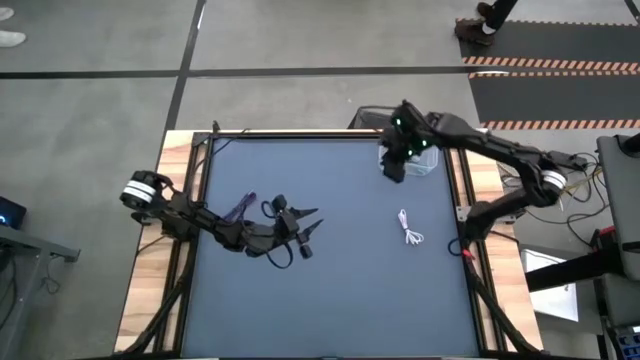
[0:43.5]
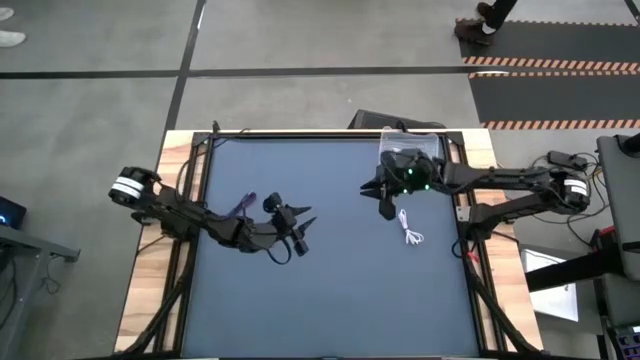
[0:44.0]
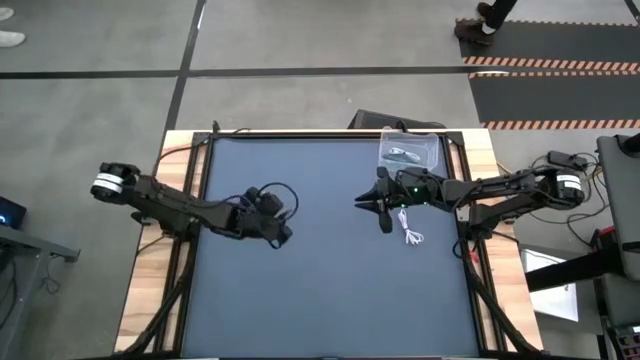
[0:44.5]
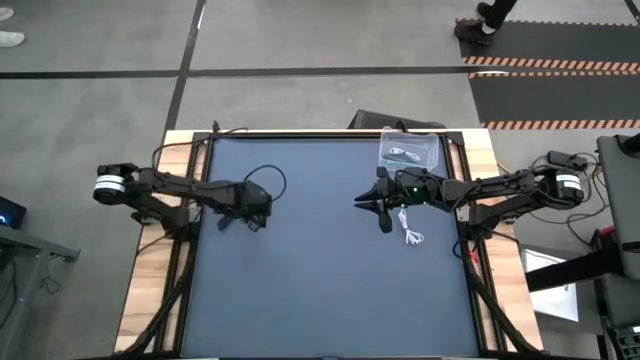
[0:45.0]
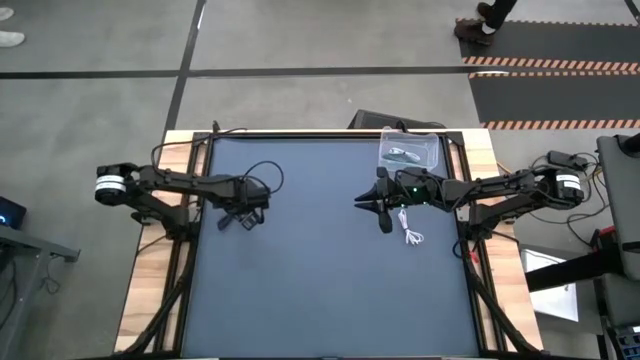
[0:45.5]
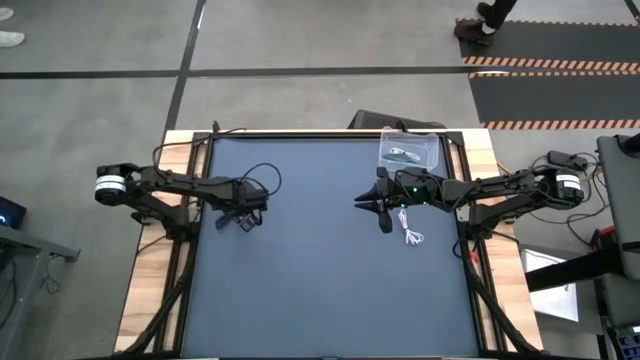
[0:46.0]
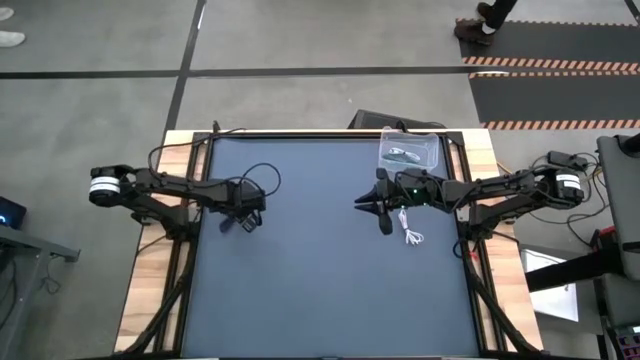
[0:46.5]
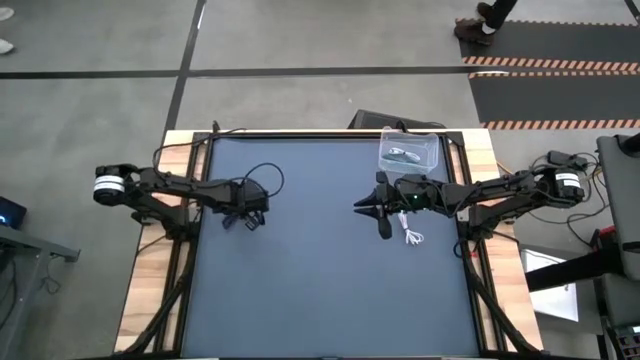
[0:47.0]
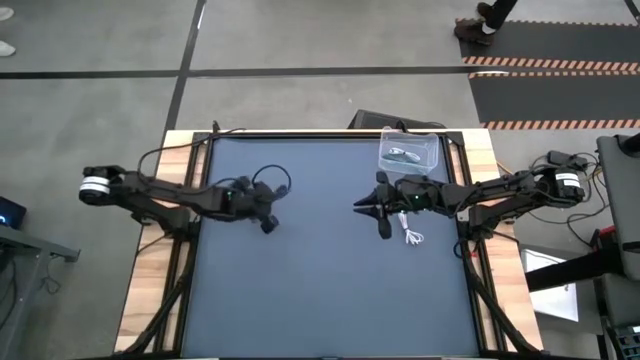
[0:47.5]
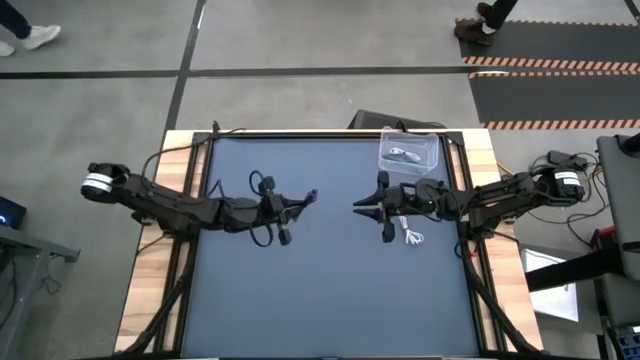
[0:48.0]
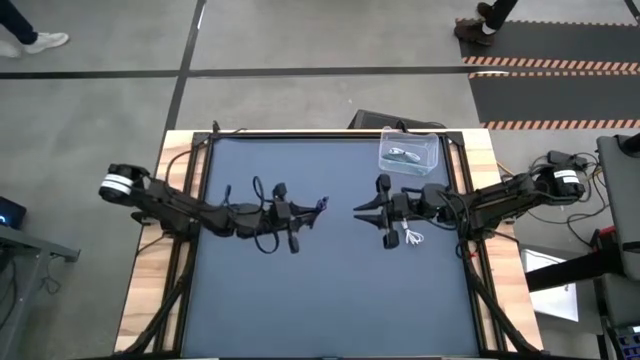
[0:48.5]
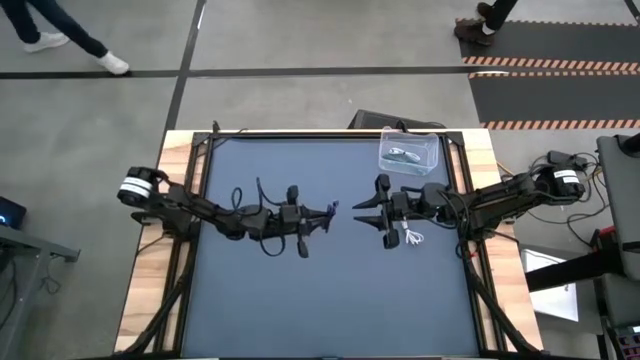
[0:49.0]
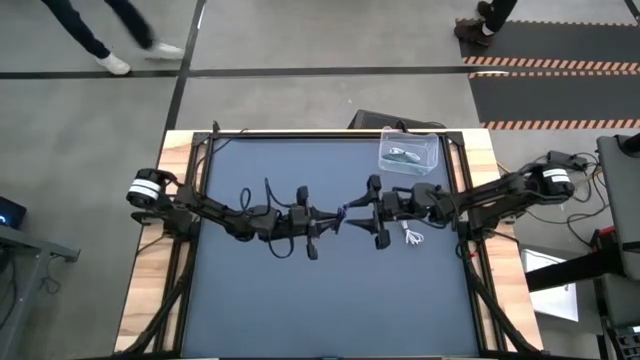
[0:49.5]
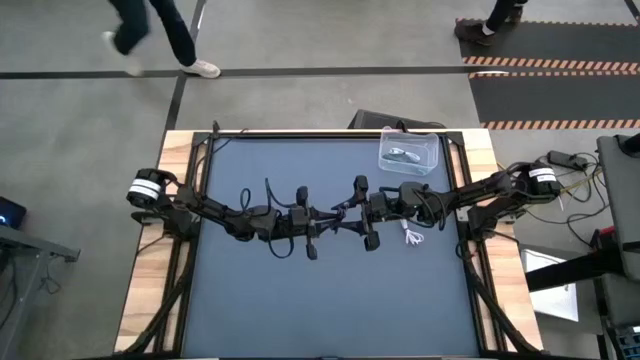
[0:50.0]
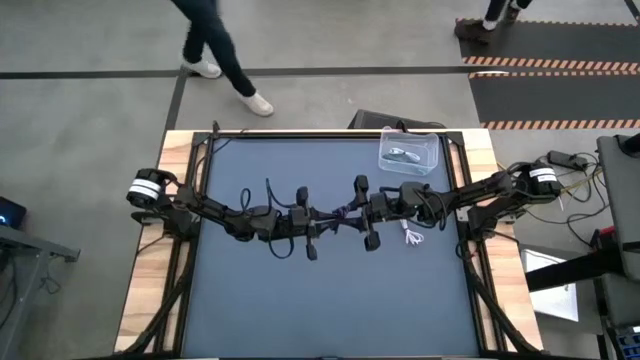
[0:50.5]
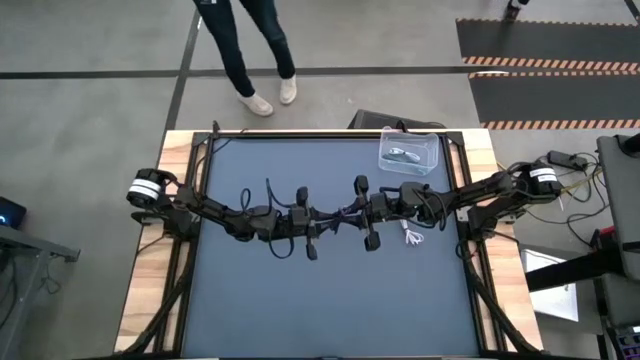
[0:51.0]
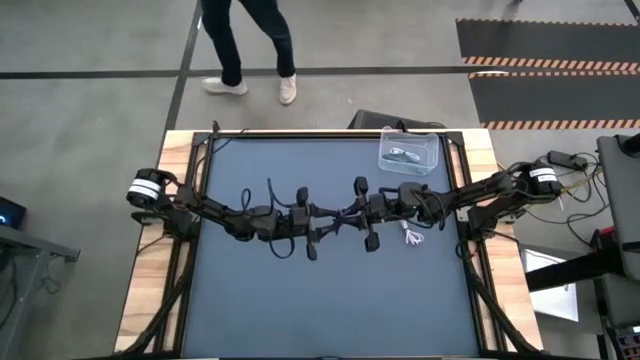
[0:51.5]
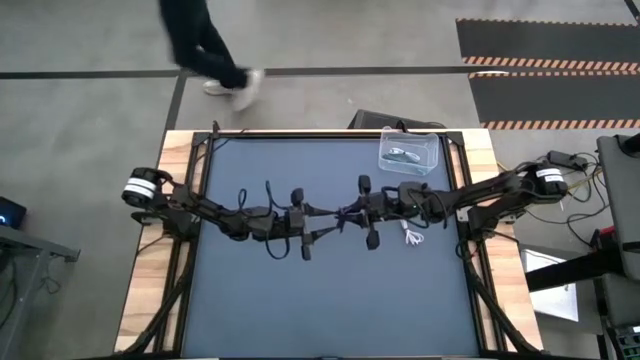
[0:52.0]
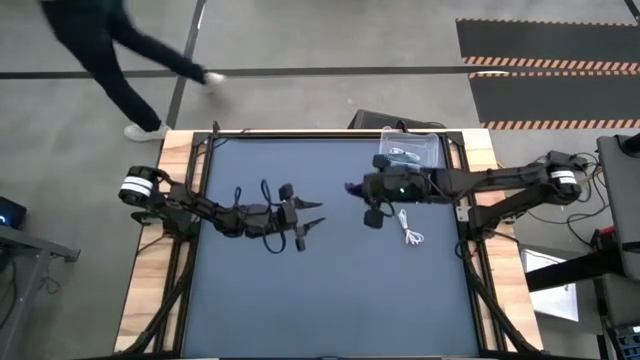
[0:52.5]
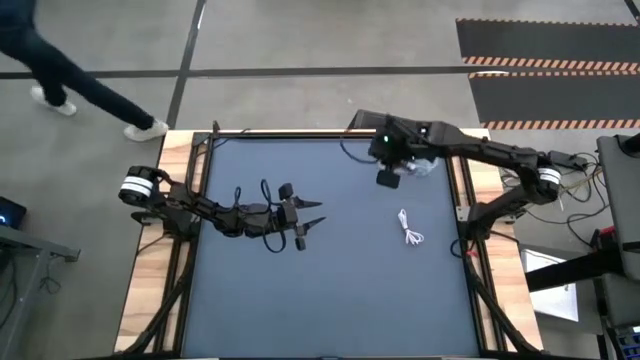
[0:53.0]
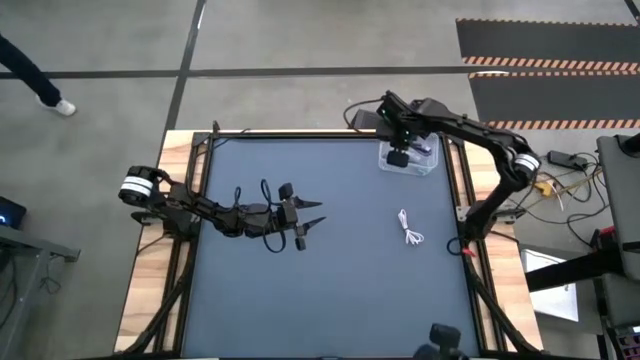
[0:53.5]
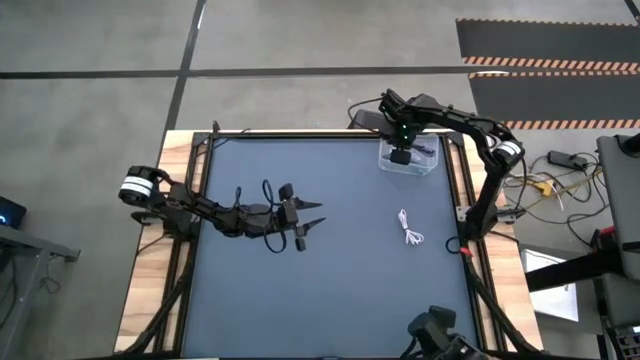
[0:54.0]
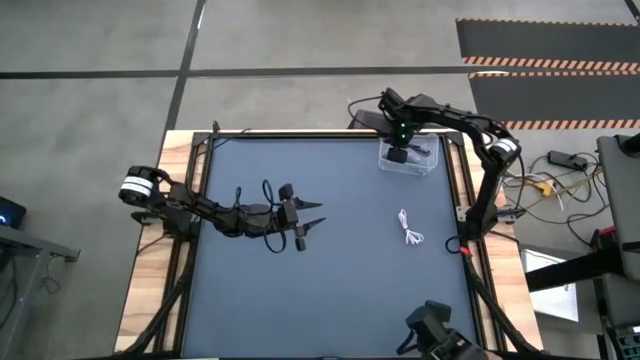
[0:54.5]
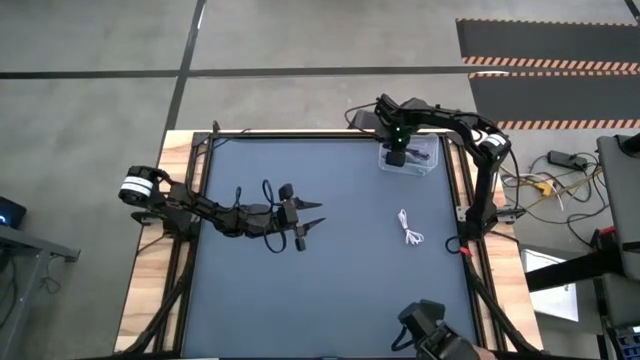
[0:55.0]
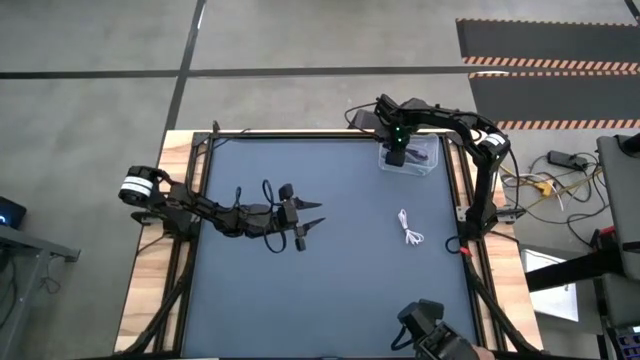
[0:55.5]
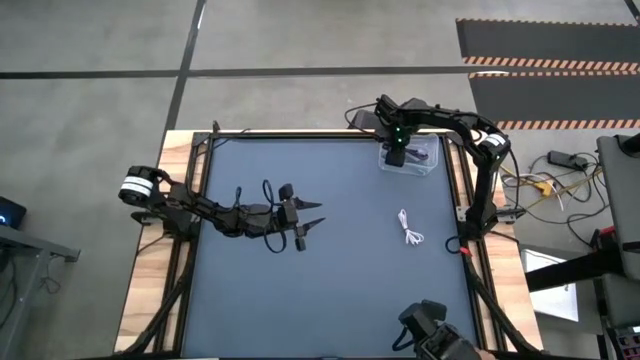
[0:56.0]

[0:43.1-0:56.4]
Task: Pick and place USB-C Cables
Put the violet charger cable into the bin

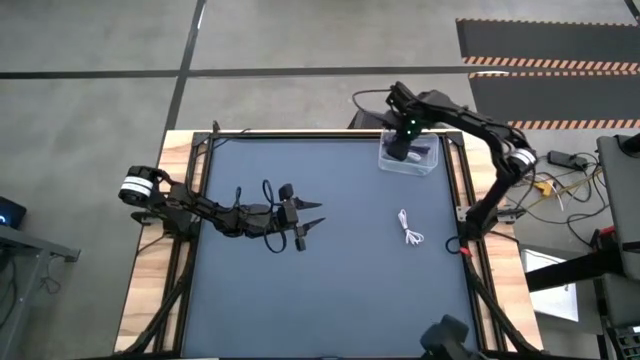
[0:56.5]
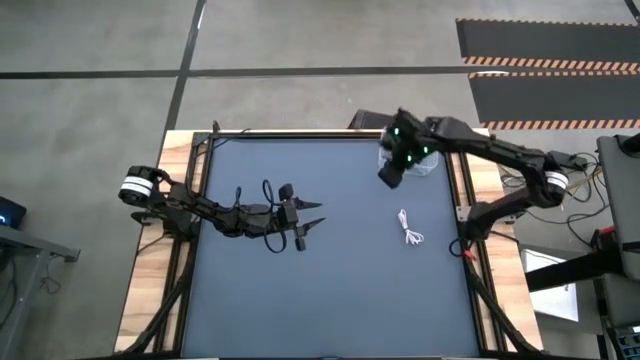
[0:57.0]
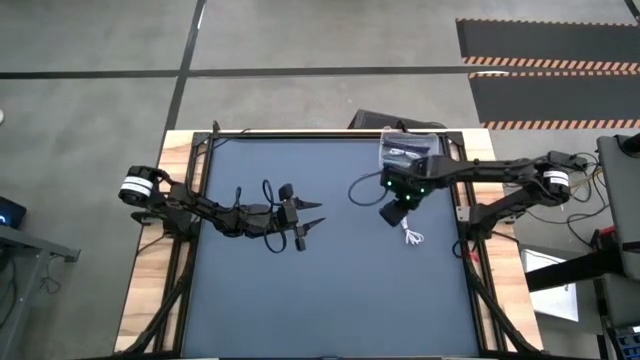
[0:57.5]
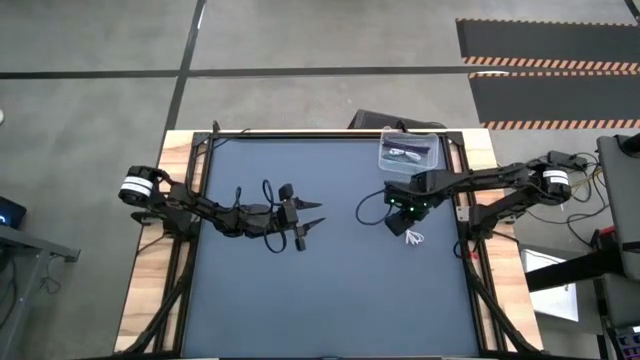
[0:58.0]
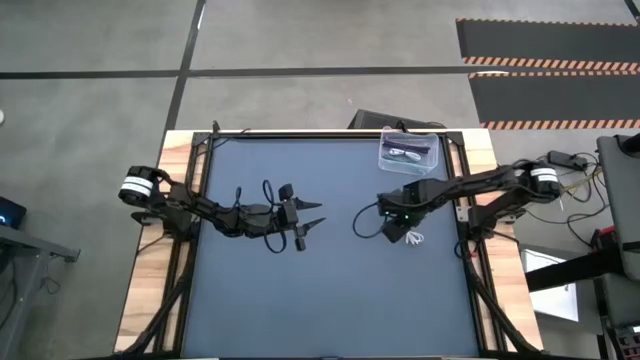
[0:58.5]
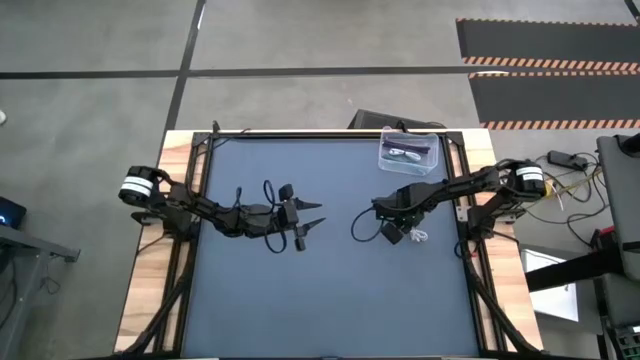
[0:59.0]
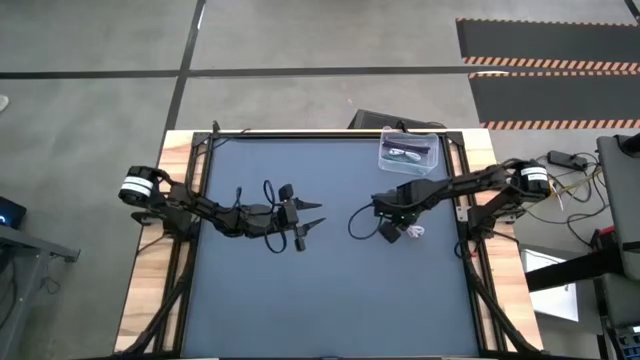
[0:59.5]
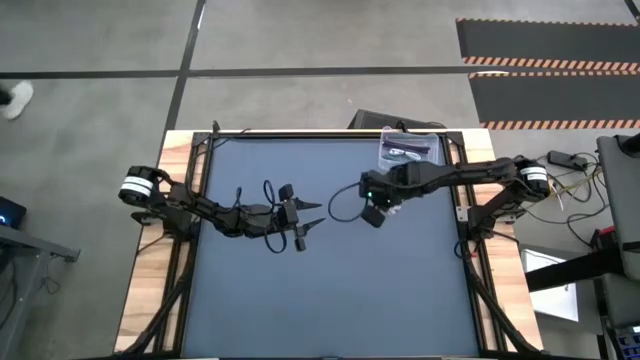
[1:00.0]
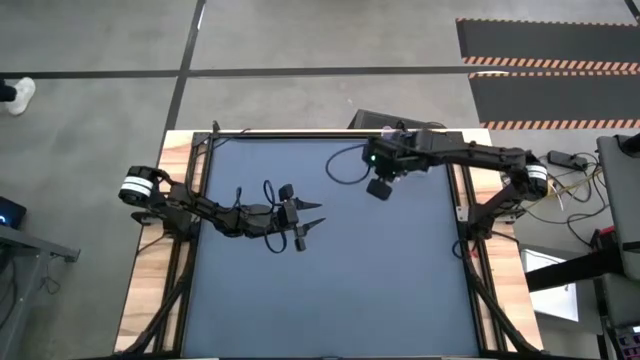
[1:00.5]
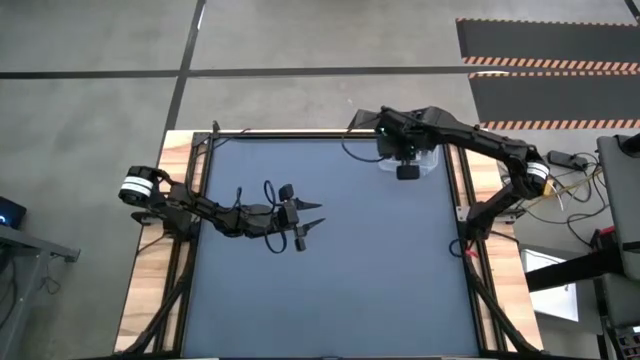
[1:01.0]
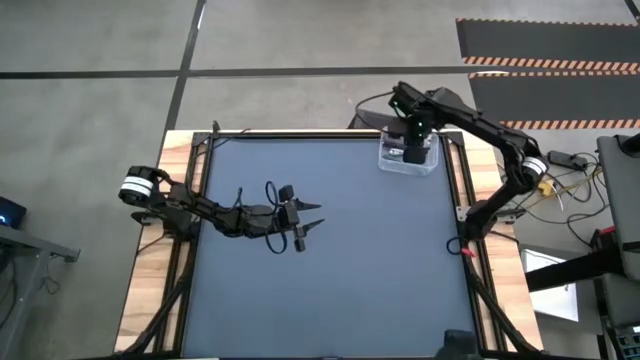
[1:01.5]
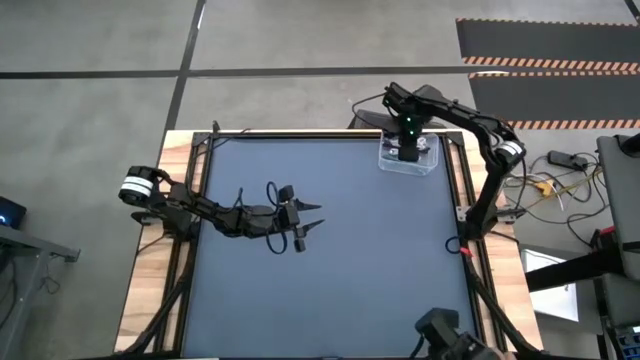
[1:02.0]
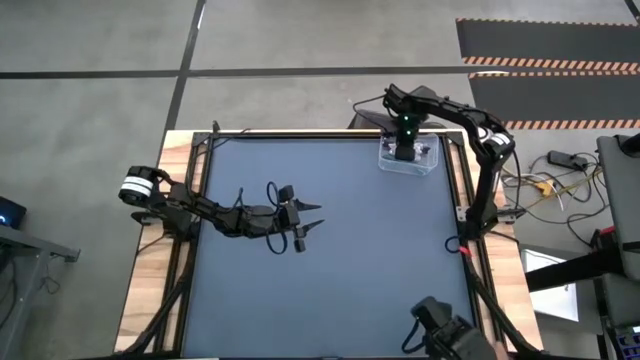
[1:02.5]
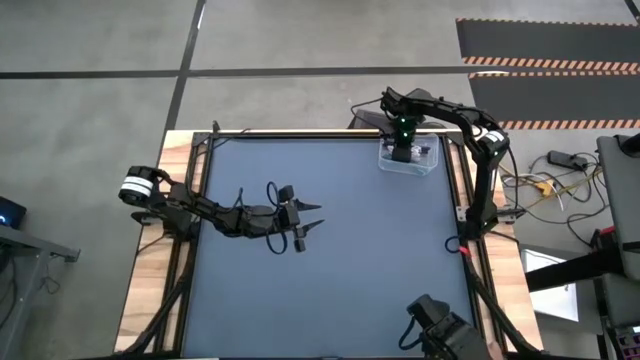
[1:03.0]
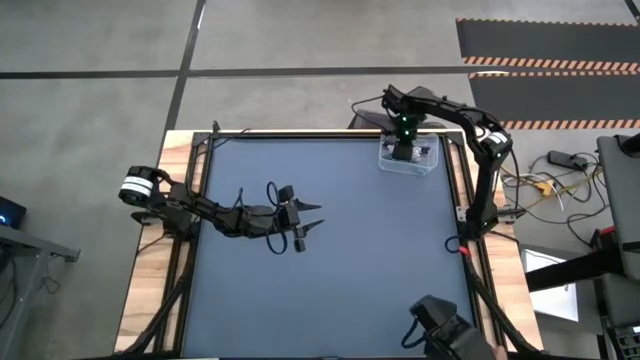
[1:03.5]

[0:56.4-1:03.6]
Put the white charger cable into the bin
